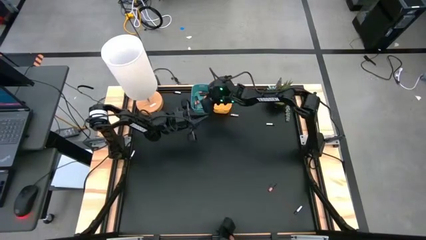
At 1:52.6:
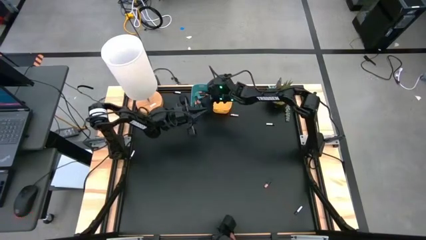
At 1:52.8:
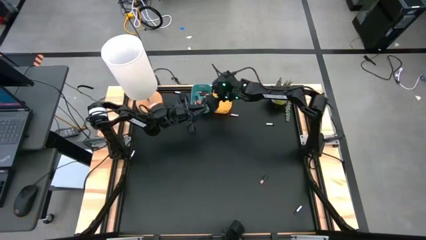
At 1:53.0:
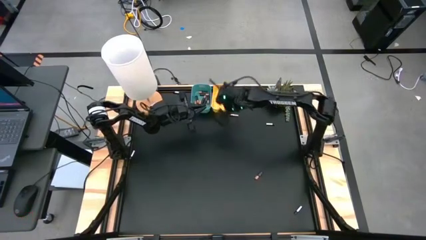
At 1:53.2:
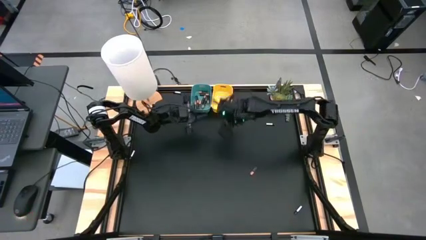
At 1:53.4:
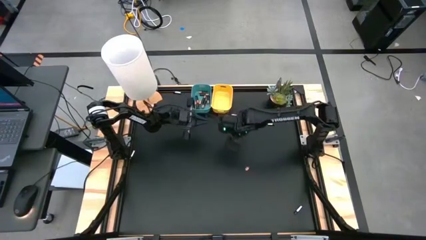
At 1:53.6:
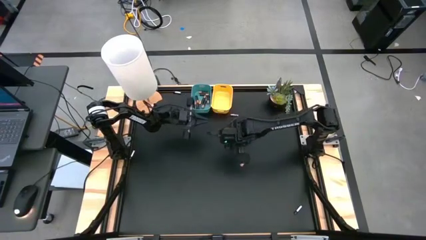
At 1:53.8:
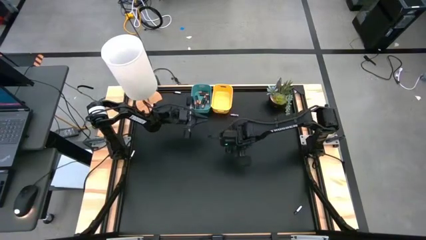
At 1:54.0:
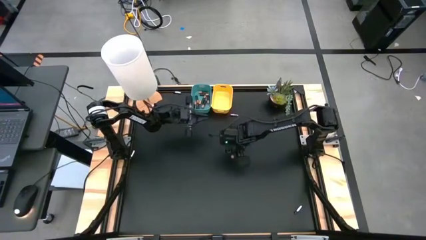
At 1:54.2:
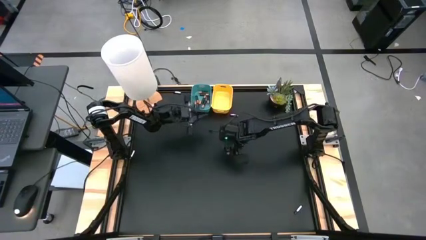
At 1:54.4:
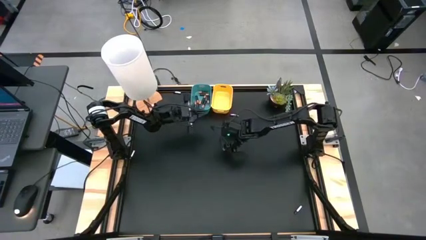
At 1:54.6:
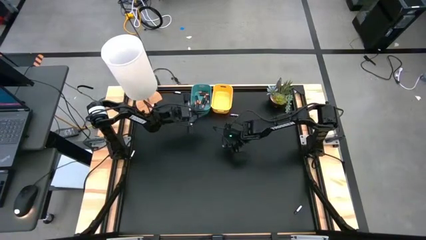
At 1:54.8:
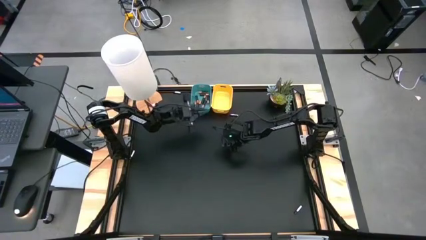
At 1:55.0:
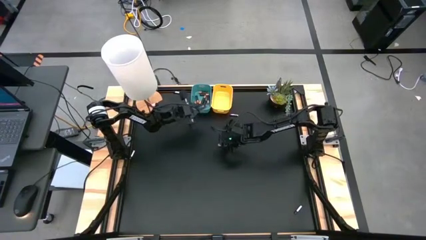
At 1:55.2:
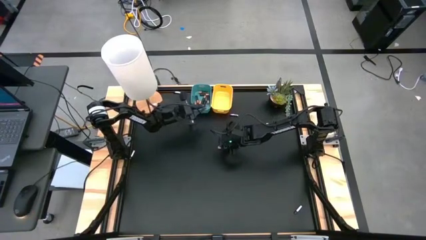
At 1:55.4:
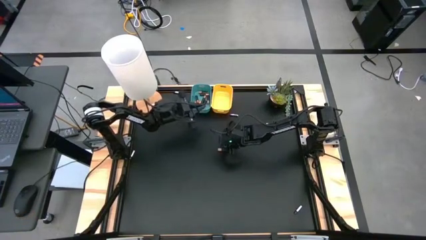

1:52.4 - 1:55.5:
Task: Sort batteries
Put the gold black battery into the blue bin

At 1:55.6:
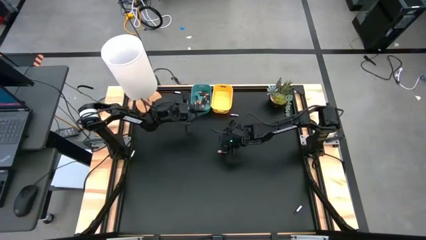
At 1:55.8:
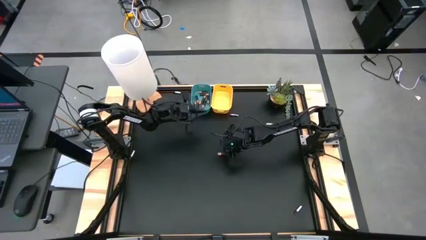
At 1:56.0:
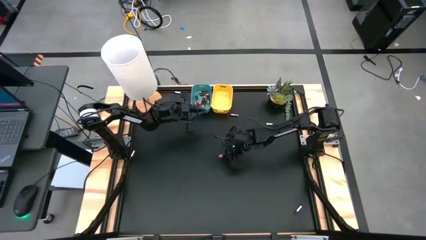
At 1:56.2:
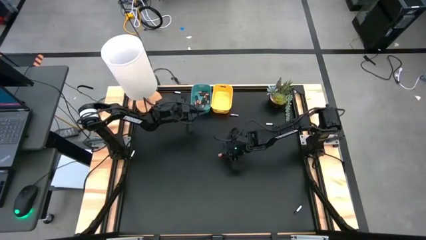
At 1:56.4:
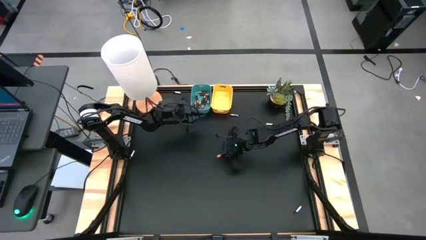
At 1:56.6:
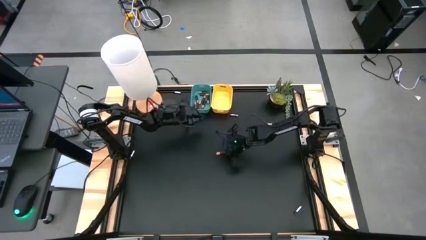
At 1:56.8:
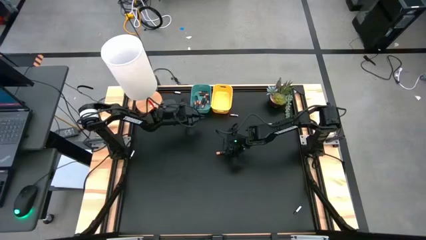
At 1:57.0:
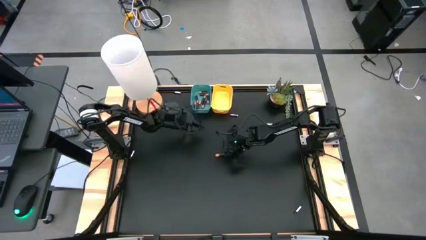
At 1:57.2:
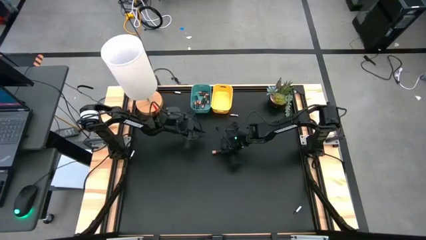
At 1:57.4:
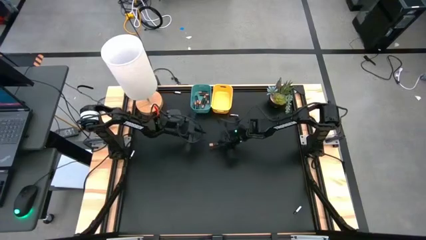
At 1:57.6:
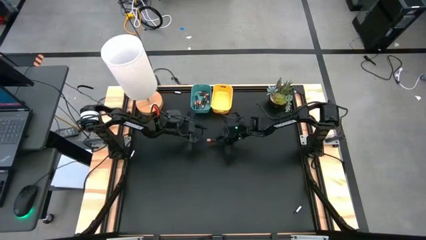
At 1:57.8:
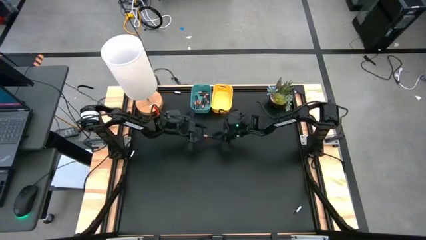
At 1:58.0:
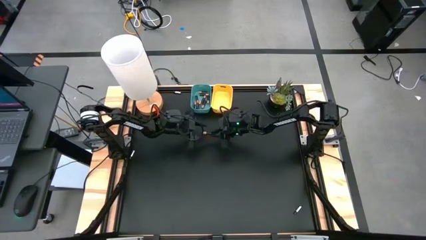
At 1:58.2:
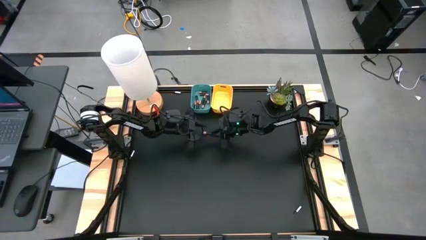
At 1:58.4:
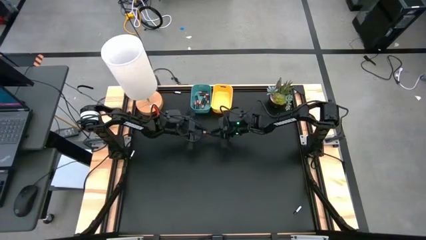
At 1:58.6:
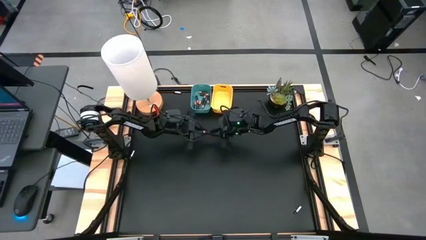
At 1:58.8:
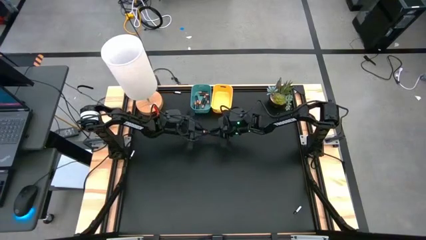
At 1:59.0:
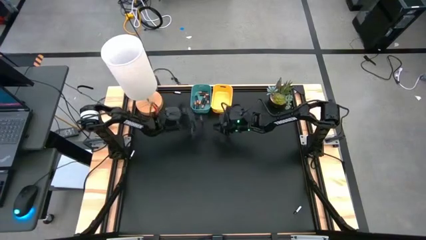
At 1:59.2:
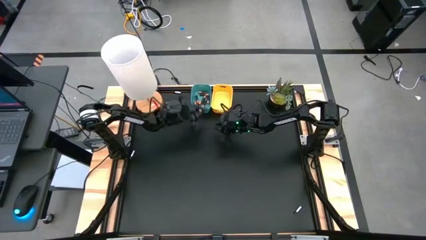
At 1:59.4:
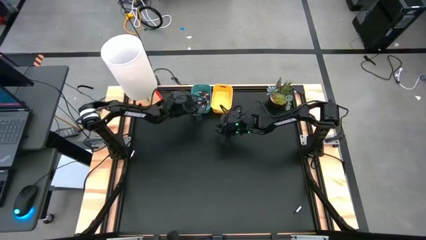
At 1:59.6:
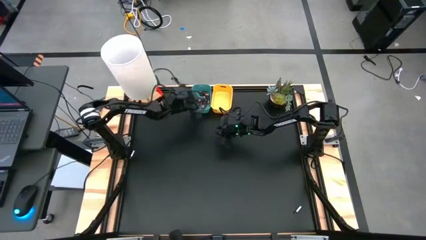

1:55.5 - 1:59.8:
Put the gold black battery into the blue bin

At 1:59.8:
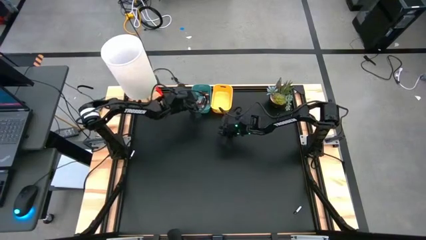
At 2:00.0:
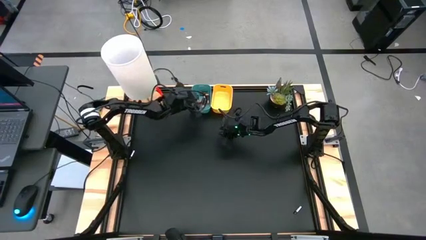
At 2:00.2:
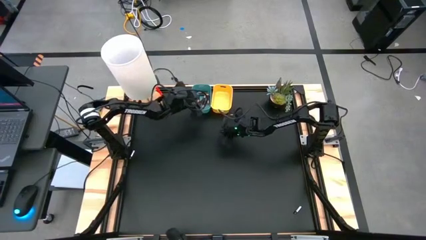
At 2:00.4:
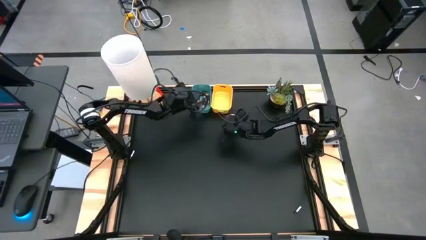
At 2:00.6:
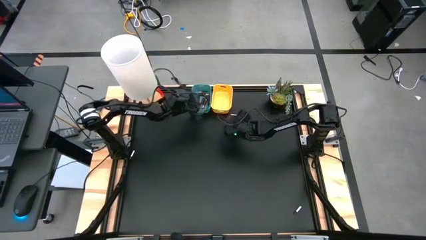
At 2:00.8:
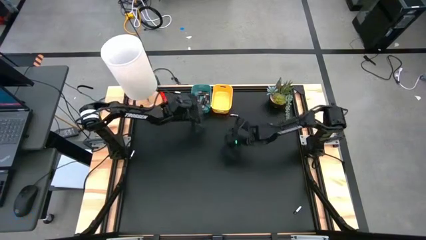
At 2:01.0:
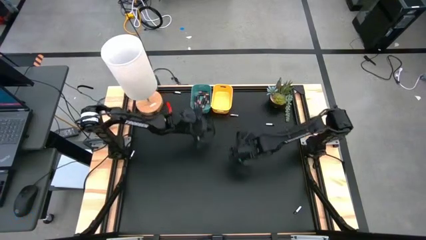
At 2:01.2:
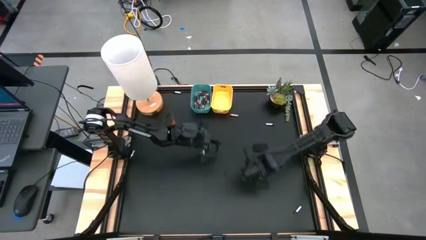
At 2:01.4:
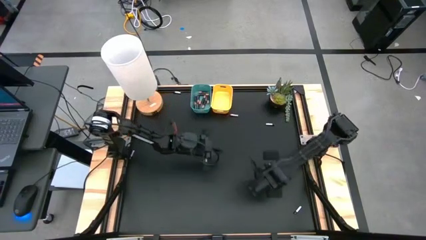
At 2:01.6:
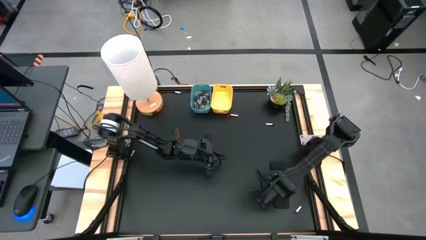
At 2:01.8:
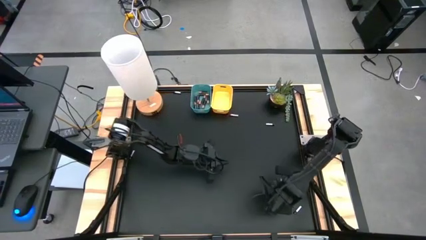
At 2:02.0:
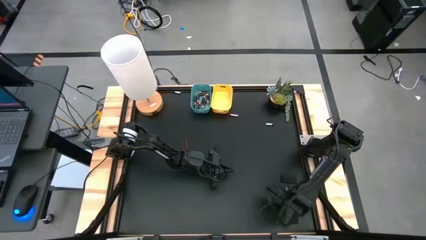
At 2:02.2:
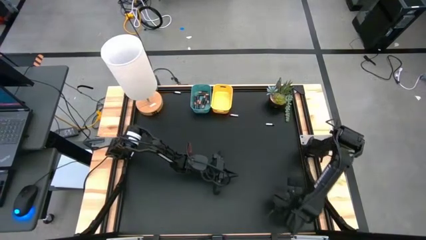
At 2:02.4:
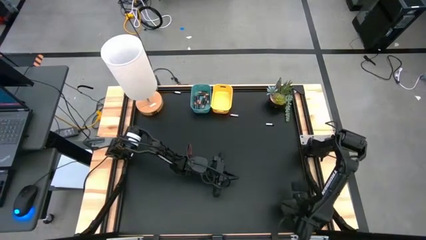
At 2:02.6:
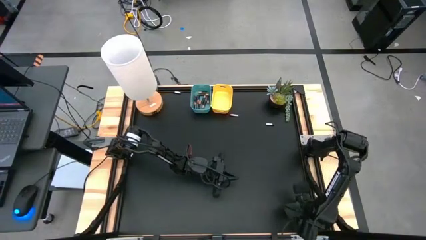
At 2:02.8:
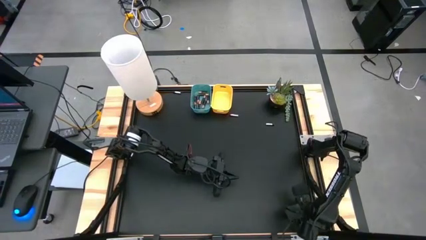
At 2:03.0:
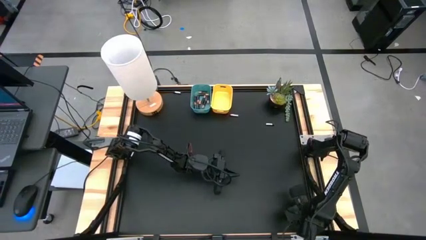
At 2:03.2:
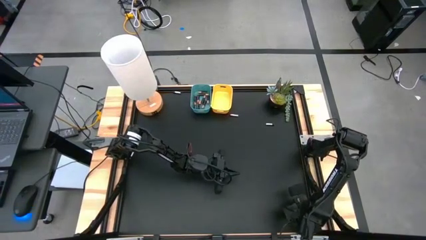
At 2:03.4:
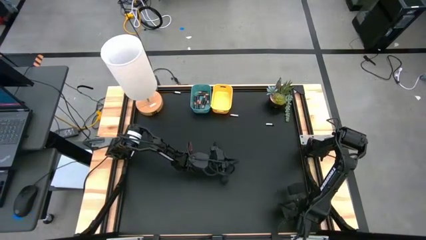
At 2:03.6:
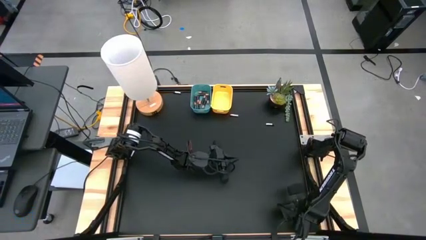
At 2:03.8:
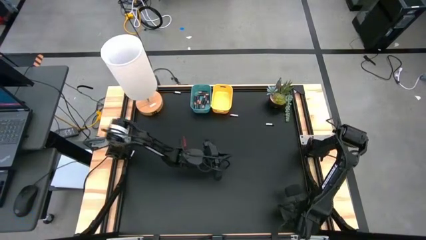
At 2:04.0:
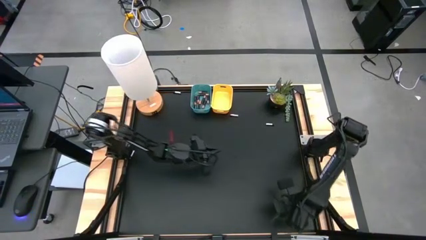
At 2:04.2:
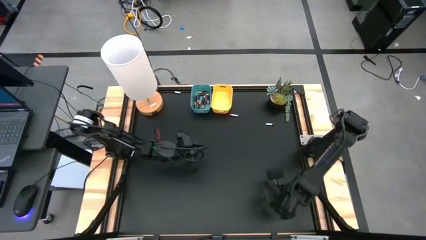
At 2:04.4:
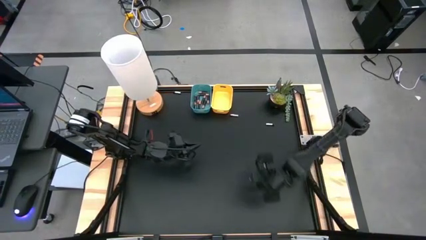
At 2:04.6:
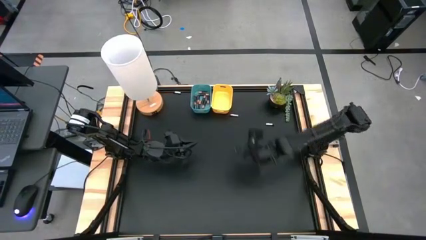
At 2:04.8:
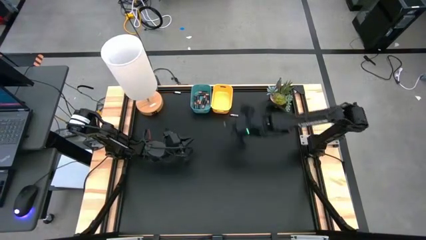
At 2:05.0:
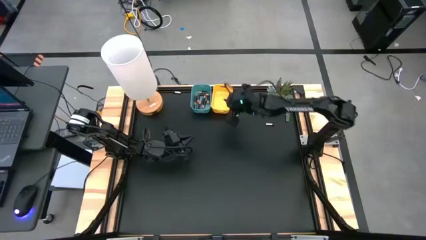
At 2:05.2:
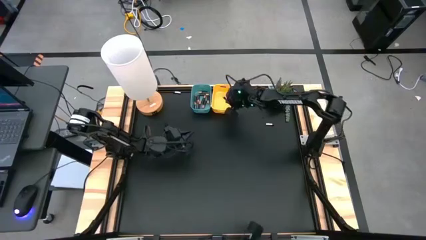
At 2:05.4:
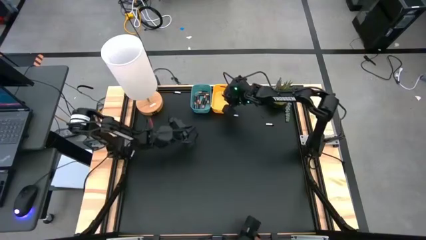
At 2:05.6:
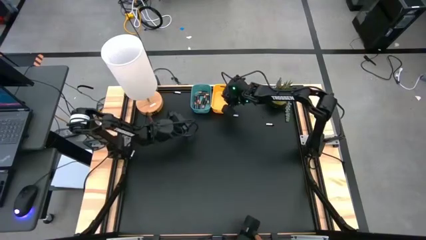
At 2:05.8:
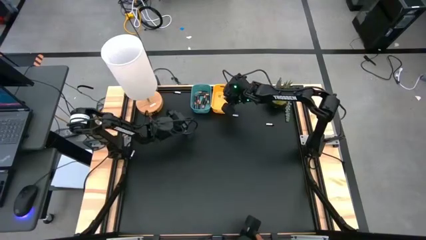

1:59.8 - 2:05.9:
Put the silver black battery into the yellow bin

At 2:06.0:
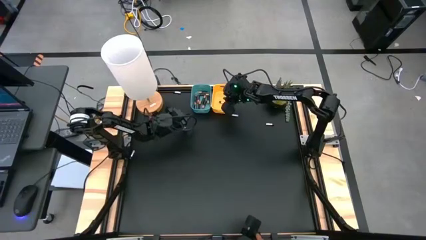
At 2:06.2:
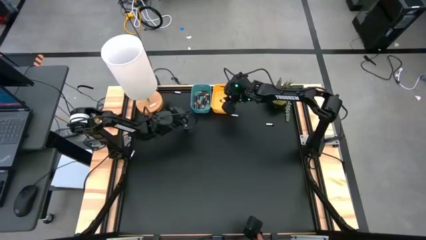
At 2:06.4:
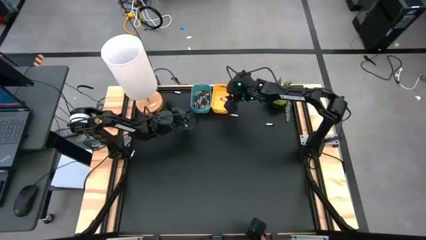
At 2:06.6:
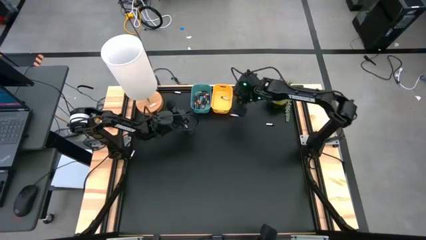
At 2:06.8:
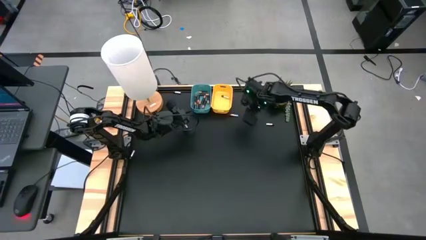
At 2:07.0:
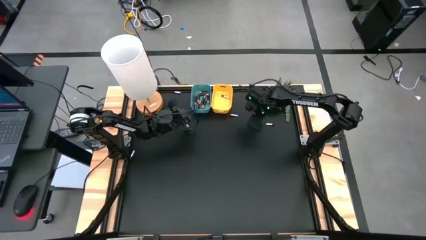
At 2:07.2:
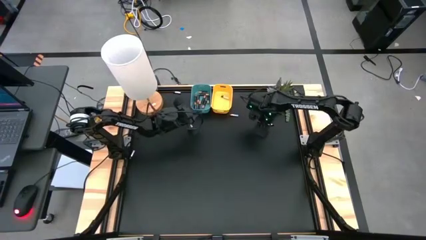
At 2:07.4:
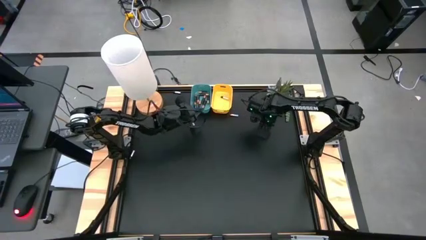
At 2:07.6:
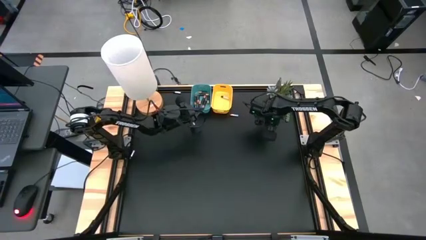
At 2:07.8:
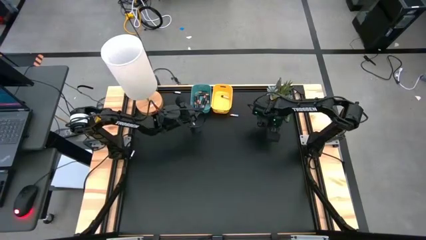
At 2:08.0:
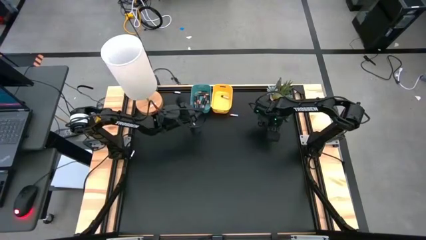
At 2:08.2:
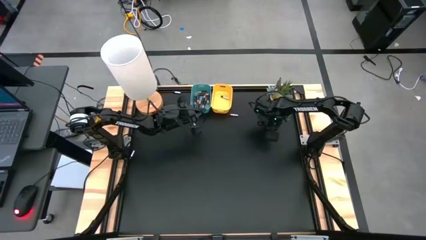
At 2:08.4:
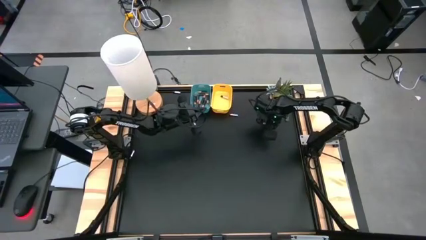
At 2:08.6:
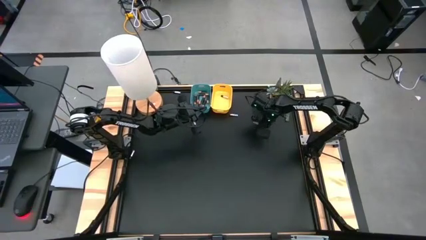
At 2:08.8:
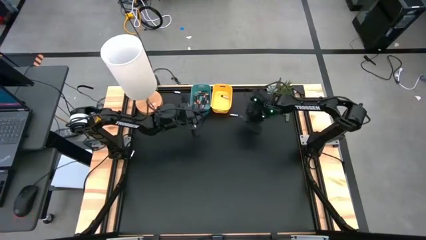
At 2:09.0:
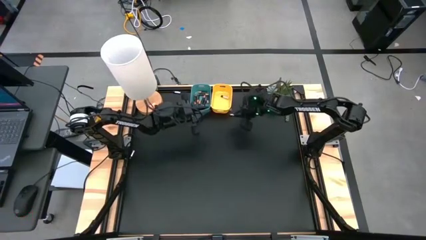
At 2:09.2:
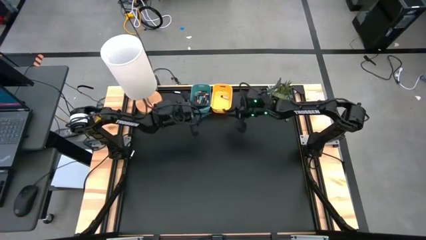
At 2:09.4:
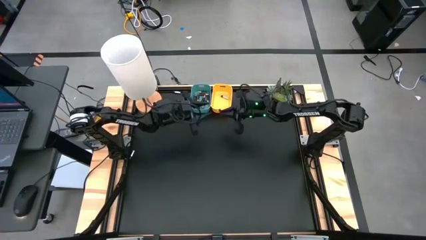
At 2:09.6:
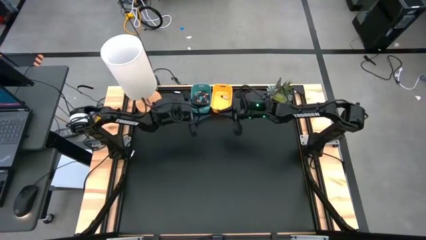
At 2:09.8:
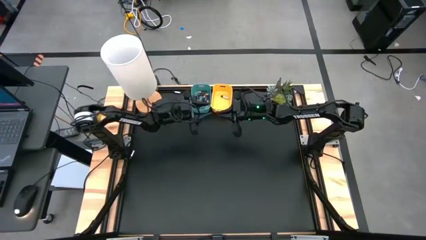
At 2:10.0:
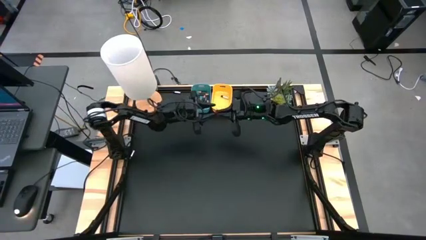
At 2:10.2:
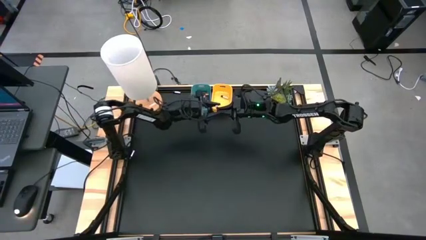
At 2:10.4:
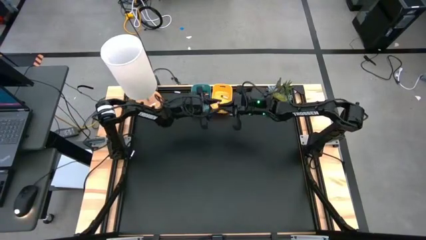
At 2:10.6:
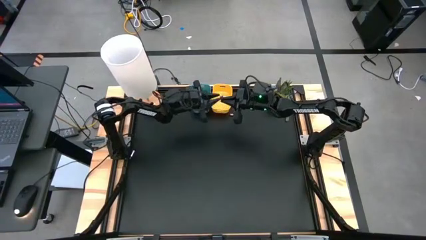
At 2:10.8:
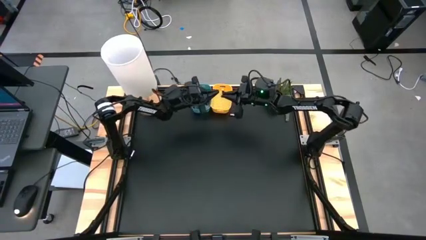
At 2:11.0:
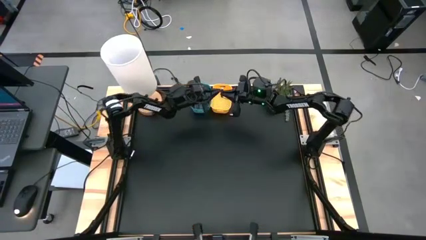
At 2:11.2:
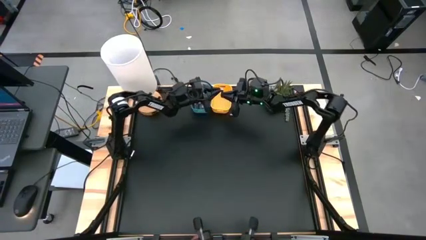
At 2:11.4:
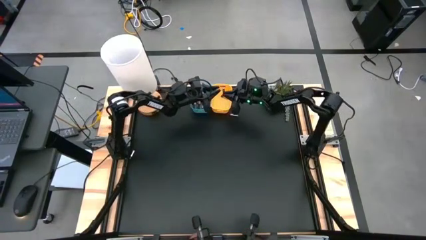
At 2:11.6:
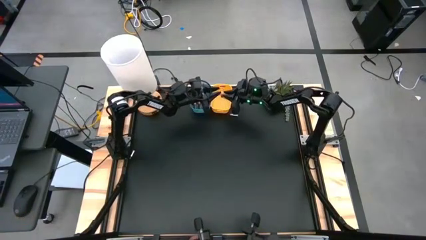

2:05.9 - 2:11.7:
Put the silver black battery into the yellow bin
